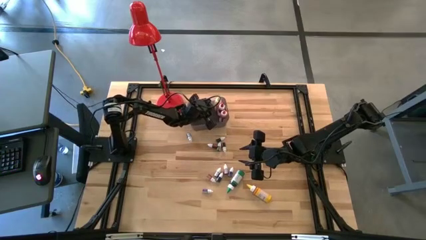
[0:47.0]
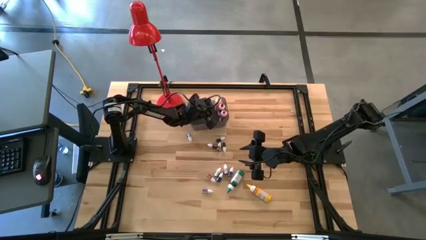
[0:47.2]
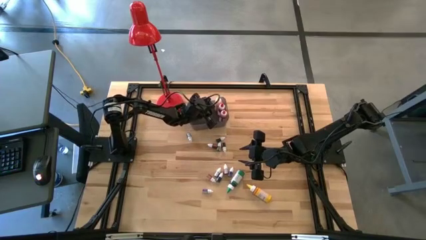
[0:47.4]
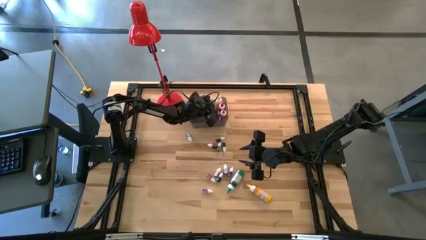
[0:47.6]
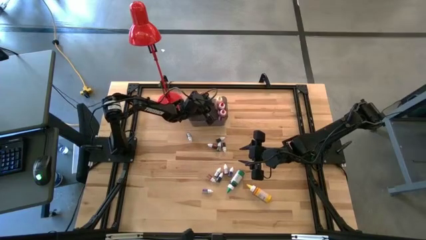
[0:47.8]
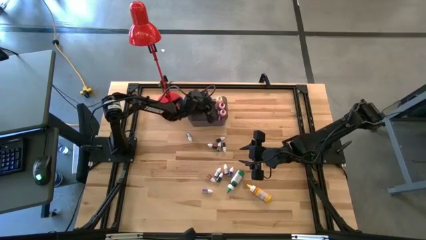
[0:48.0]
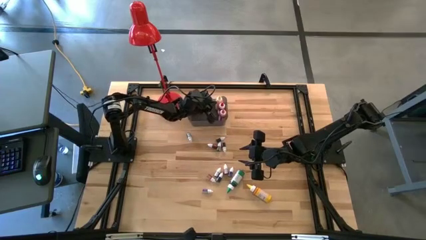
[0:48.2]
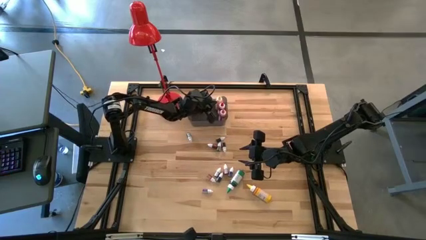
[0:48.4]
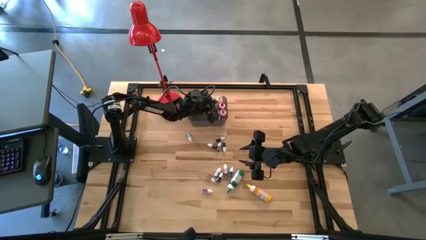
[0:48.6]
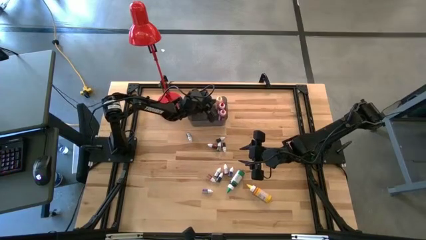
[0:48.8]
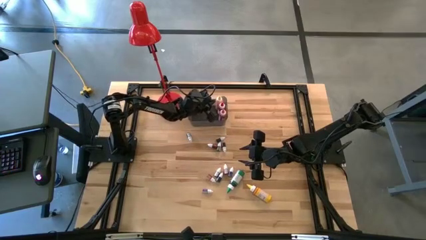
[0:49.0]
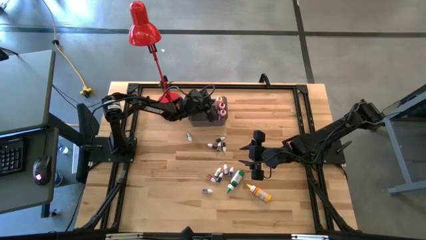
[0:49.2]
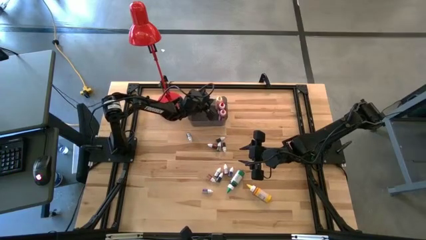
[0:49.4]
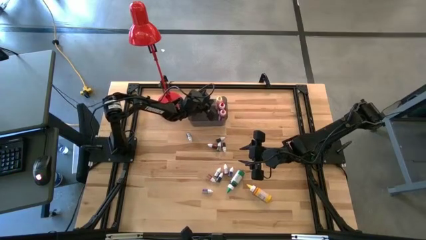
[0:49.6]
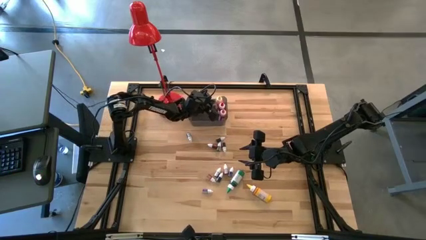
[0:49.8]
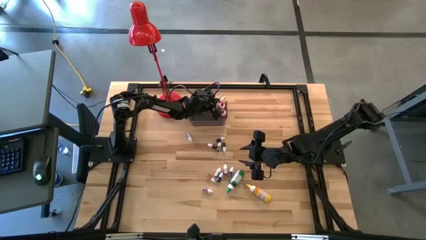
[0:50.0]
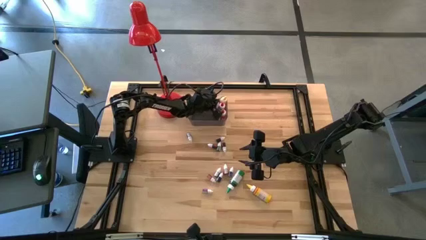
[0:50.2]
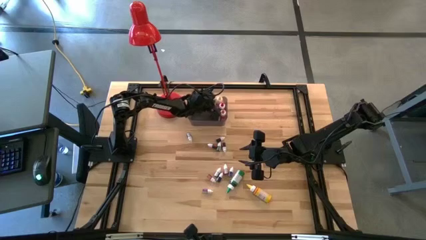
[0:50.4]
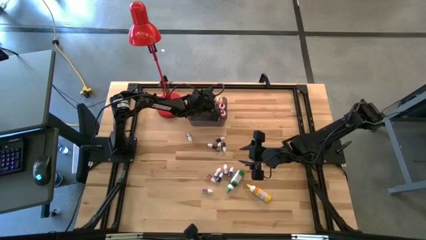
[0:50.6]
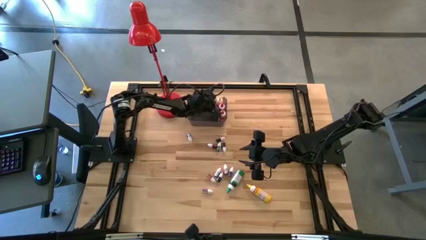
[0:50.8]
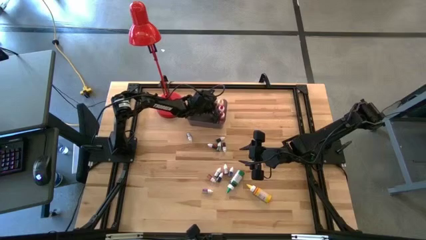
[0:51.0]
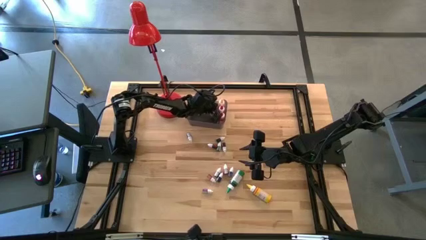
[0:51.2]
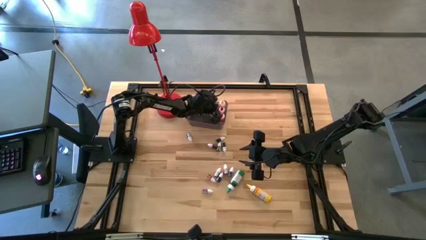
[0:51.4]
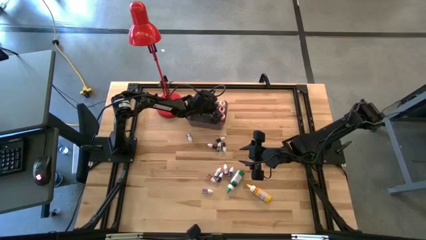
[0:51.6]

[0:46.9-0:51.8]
Task: Pick & Place food coloring
Adjust the large yellow food coloring bottle into the bin

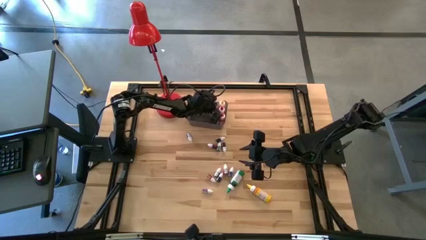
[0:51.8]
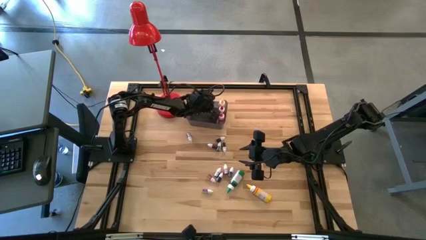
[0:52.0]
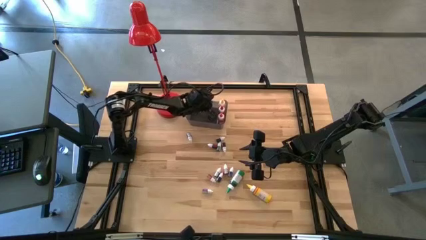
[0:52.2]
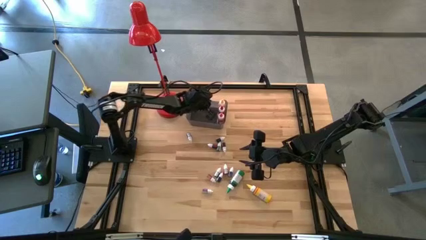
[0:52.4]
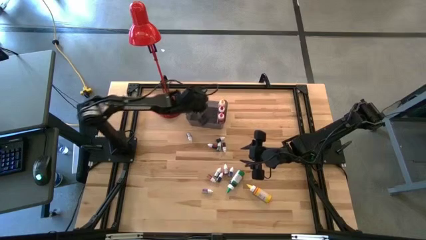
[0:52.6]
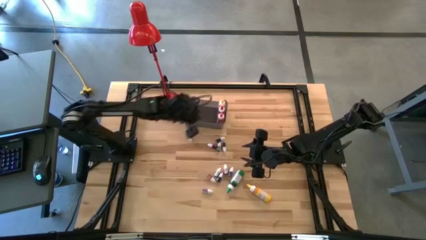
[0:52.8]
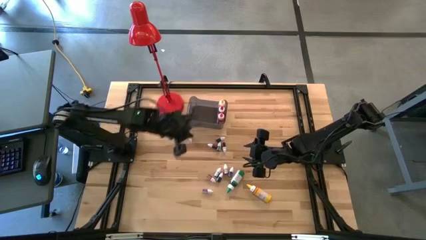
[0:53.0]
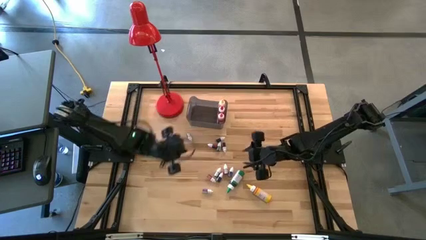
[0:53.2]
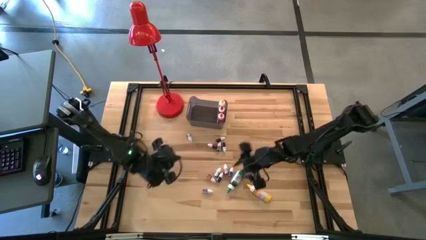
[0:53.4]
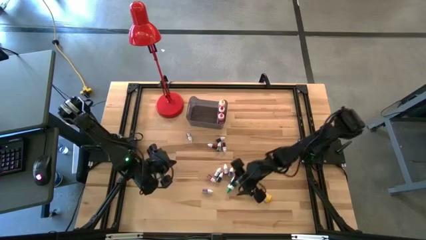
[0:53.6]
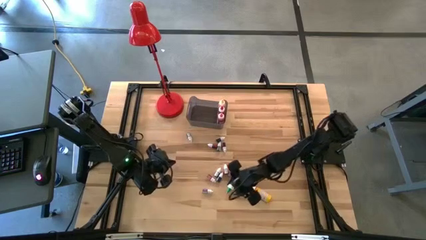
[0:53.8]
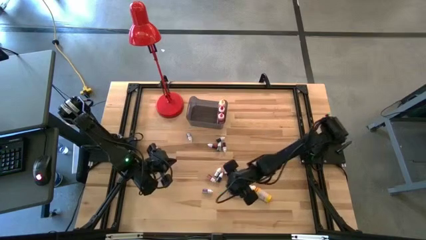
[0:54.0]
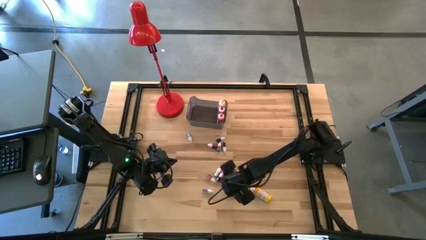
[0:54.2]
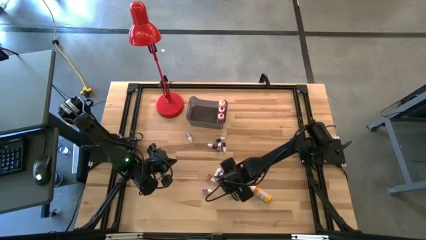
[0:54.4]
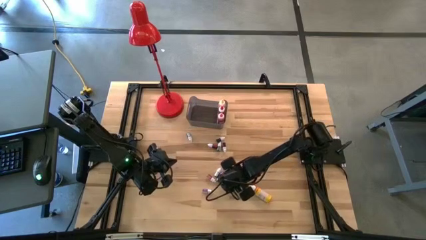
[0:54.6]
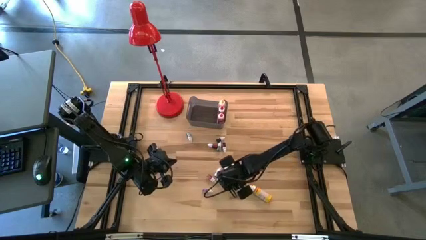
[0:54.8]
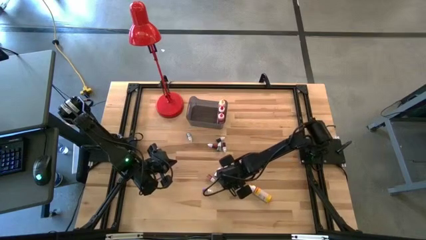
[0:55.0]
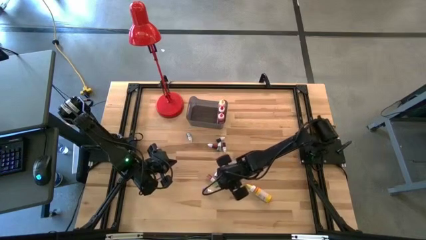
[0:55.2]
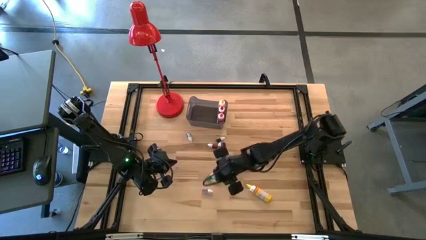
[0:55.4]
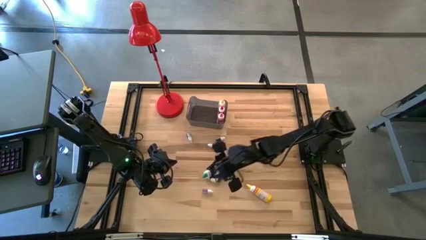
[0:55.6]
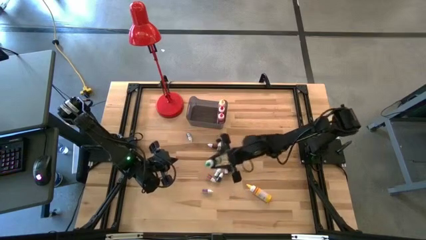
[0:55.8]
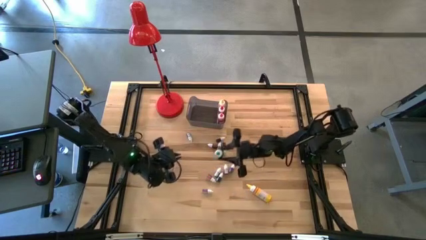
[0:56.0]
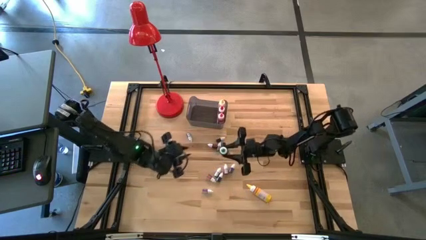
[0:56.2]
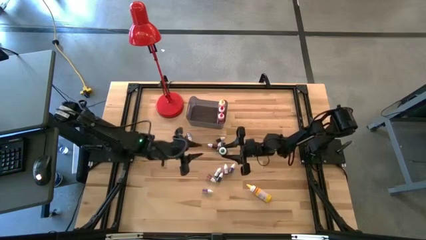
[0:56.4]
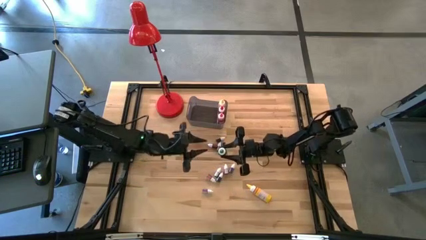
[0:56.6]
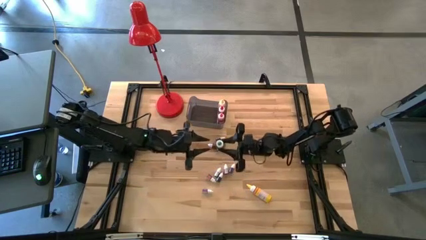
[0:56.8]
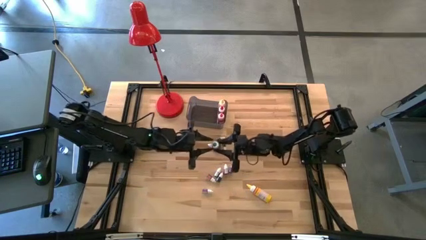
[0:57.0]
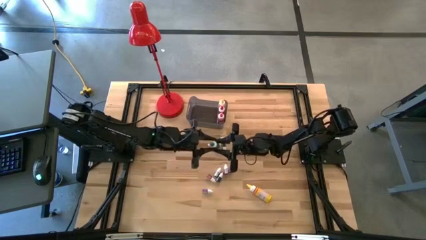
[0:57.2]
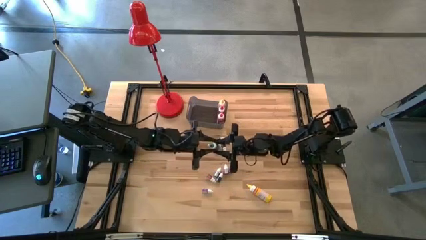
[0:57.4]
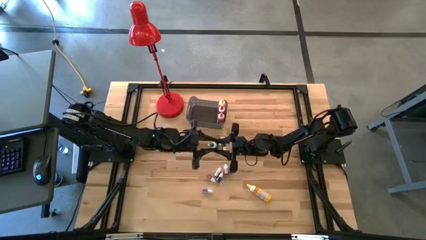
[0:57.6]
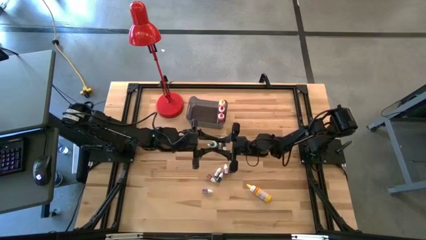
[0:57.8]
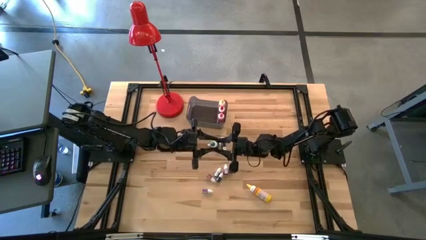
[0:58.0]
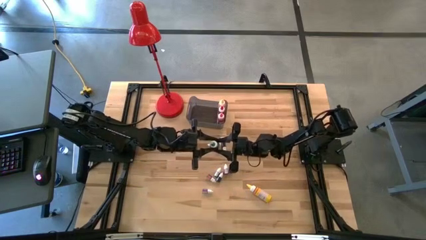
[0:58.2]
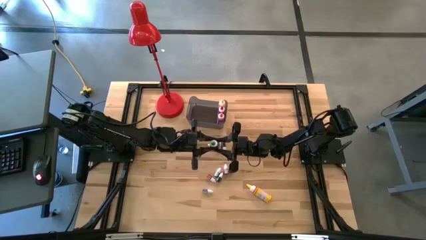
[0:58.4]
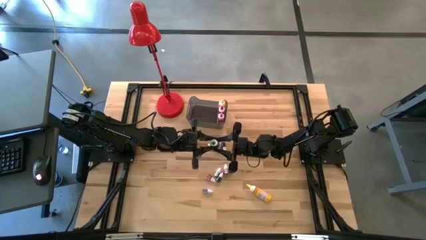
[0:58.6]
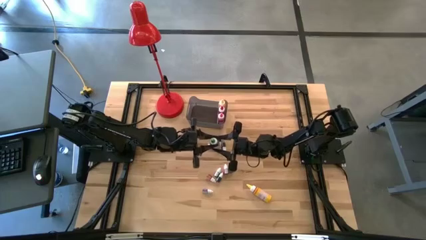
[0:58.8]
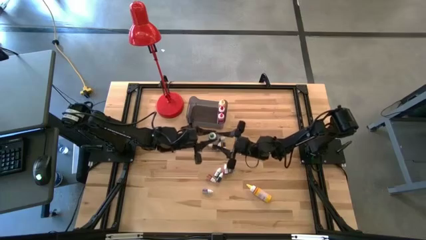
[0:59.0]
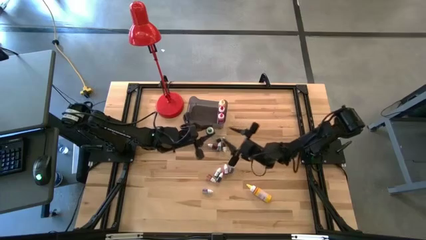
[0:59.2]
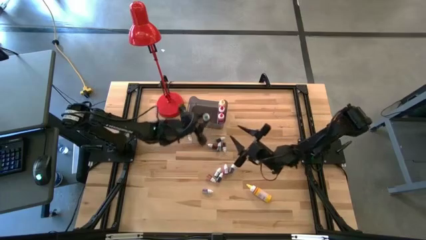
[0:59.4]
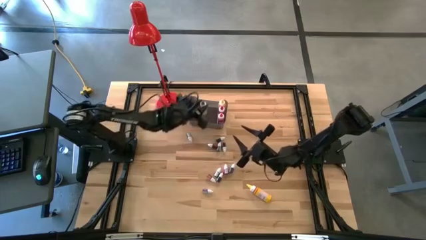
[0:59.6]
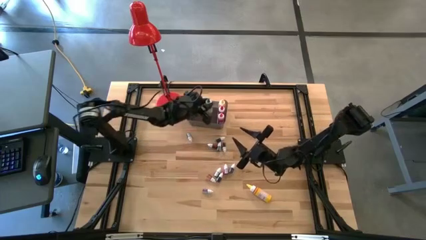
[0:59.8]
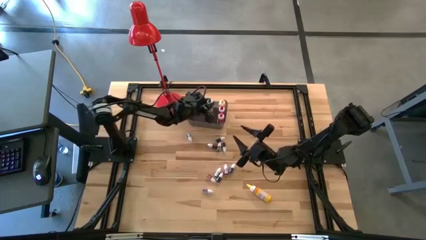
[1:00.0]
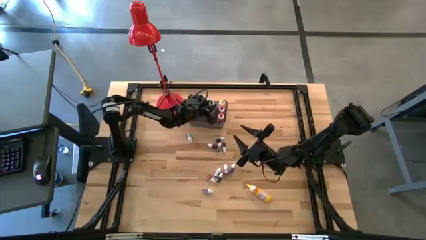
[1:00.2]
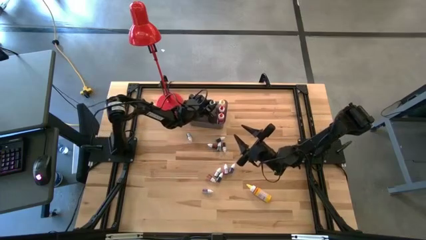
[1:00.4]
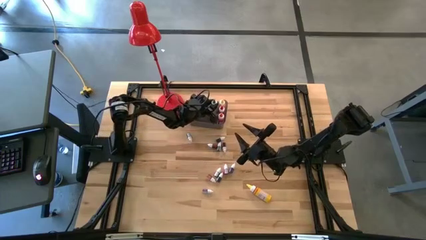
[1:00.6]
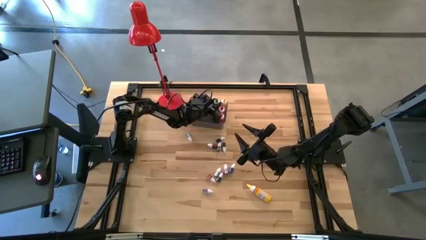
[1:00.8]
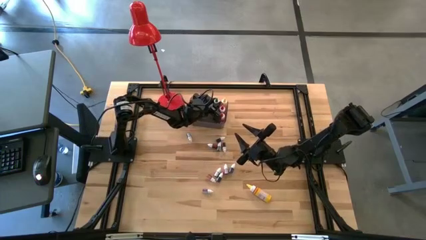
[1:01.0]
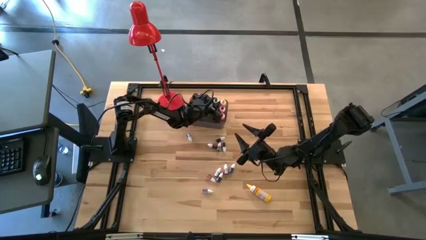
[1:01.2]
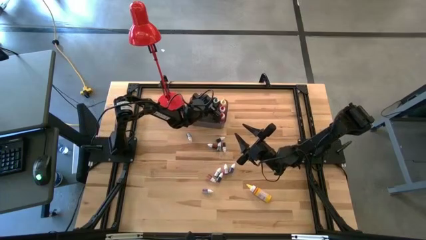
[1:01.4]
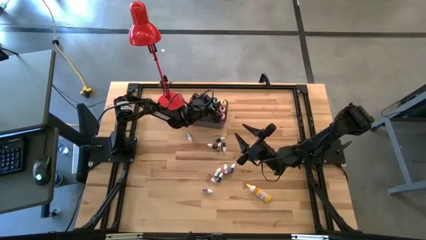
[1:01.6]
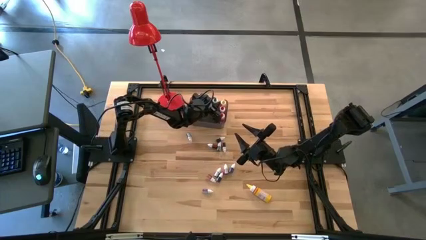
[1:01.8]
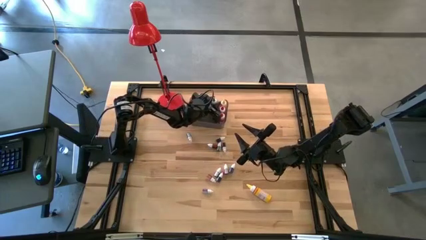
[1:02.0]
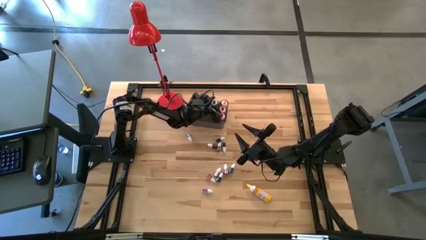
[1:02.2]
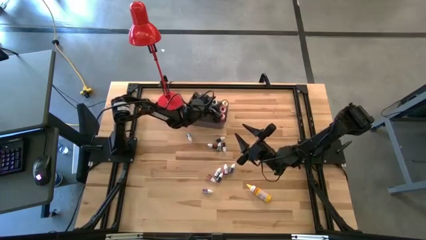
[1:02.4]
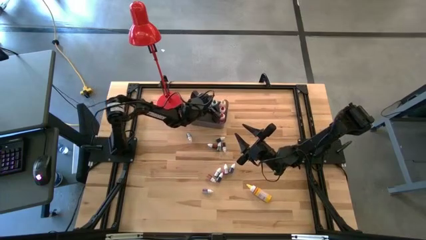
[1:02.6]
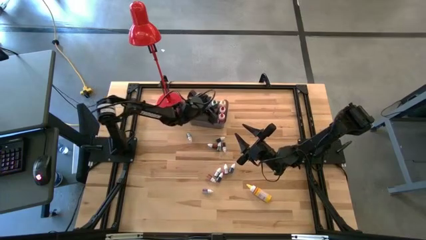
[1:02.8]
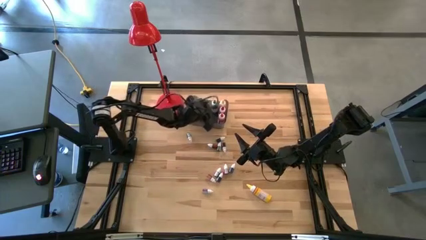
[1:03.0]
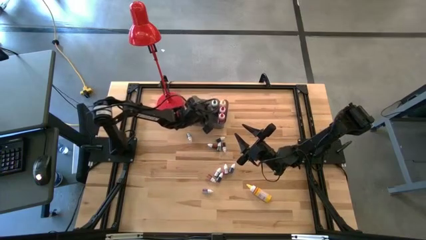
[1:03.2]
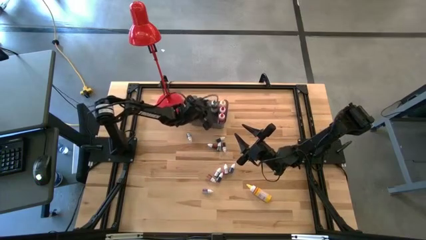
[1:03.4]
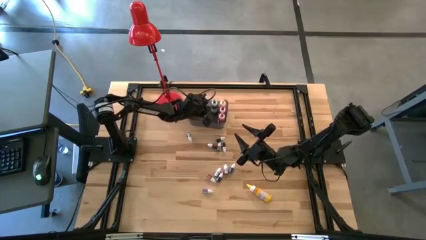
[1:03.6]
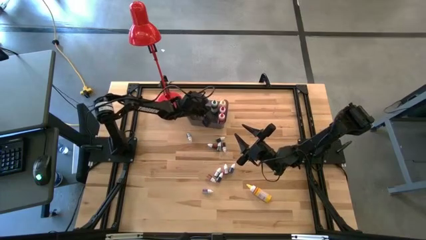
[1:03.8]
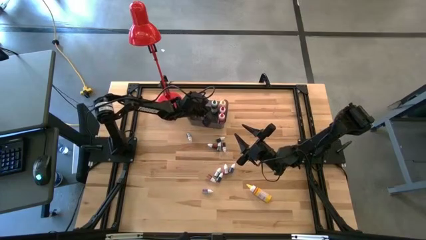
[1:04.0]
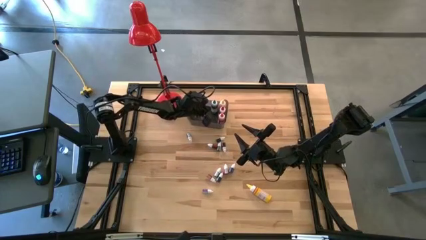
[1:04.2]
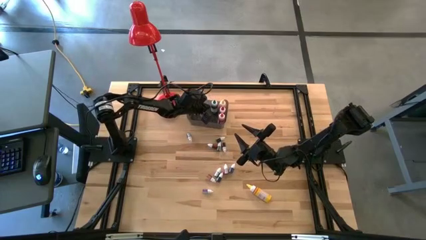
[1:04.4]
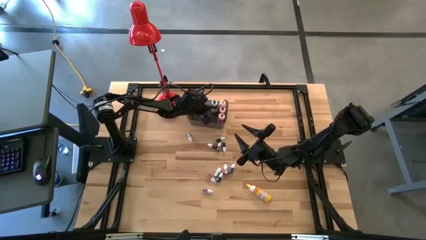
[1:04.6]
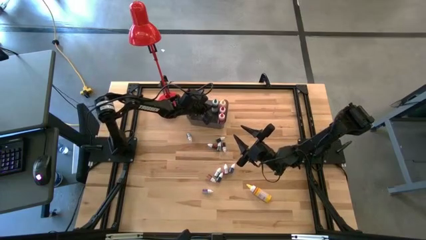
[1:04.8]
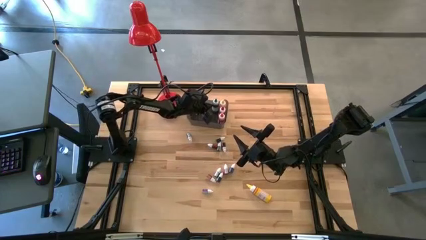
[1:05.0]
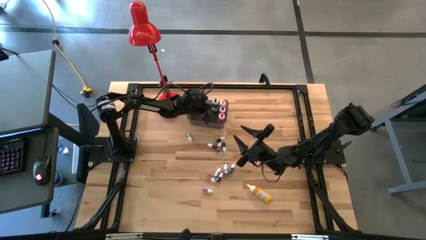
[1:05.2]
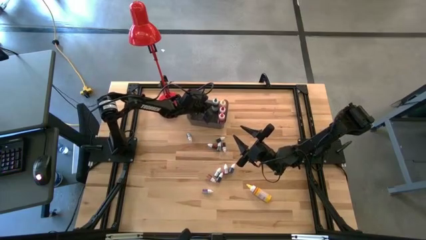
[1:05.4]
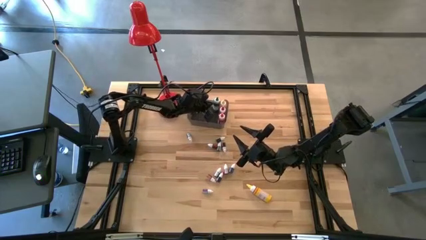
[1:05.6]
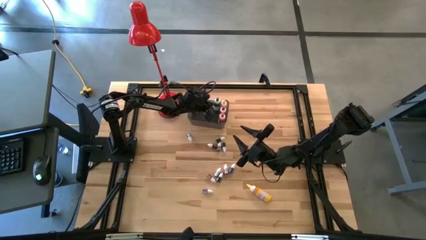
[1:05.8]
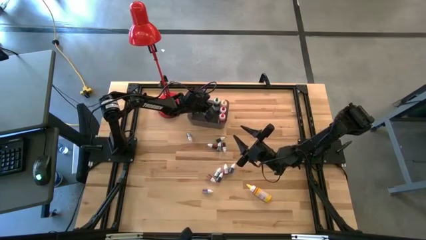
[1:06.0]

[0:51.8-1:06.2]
Put the large green food coloring bottle into the bin
